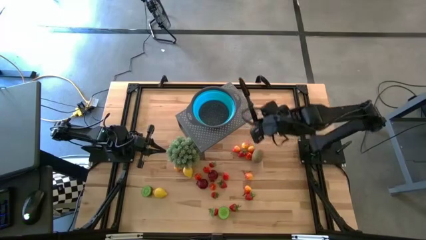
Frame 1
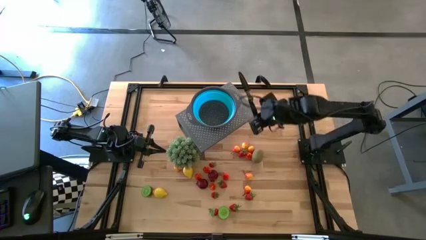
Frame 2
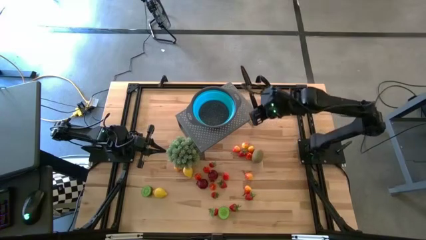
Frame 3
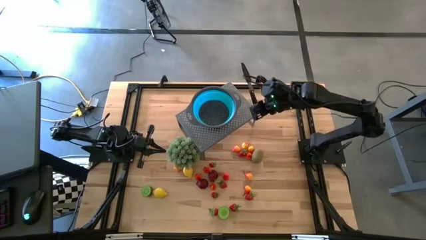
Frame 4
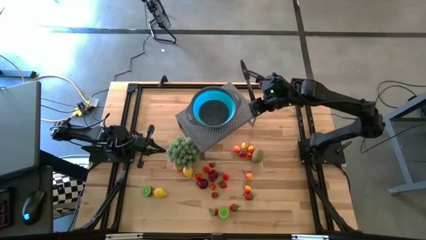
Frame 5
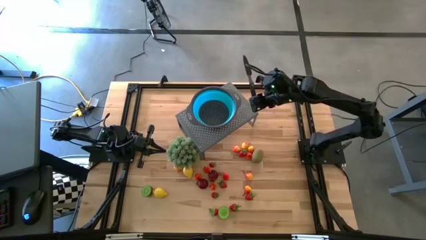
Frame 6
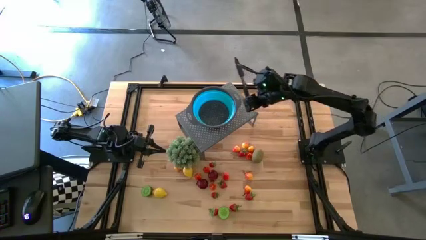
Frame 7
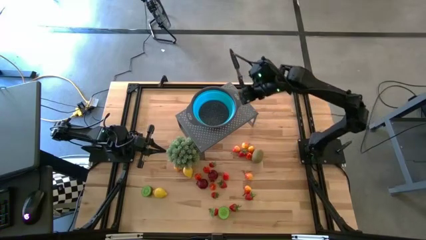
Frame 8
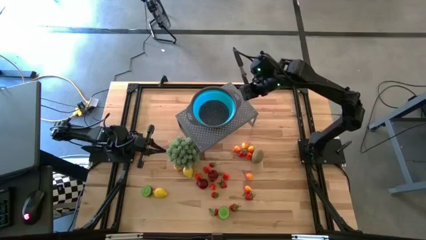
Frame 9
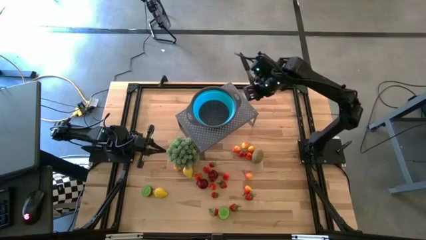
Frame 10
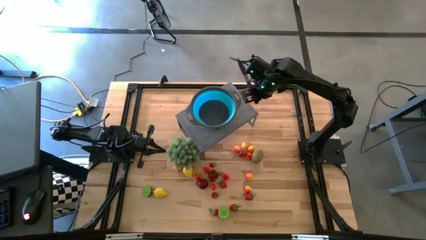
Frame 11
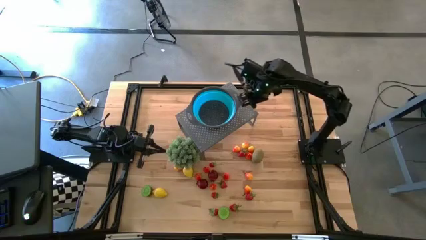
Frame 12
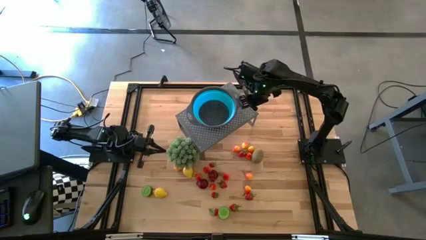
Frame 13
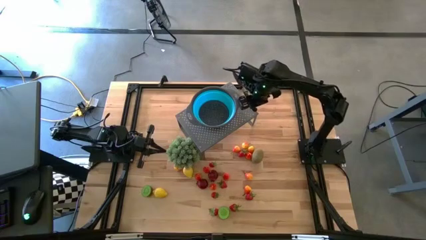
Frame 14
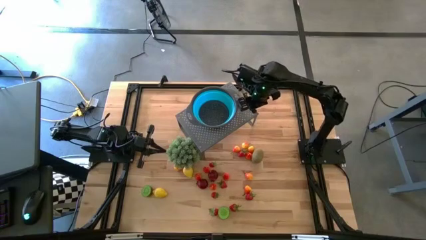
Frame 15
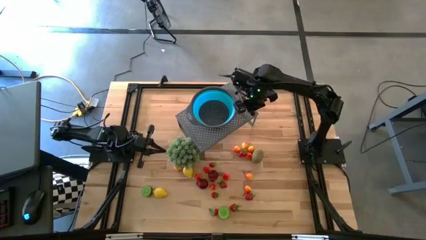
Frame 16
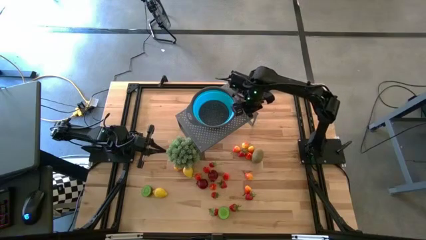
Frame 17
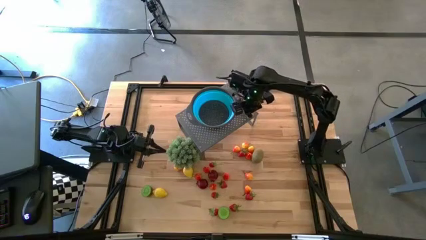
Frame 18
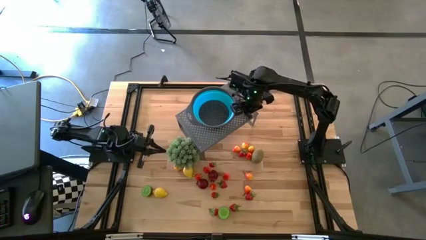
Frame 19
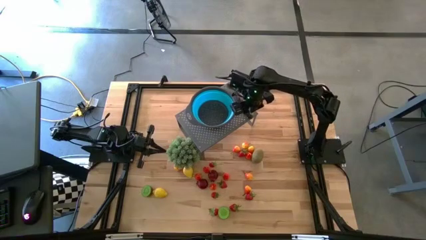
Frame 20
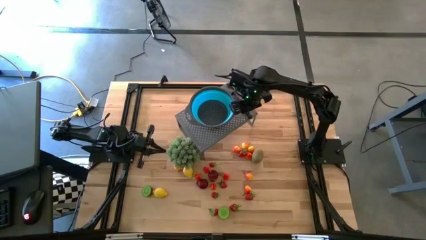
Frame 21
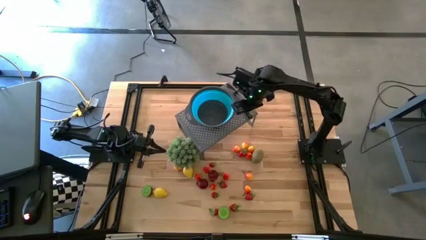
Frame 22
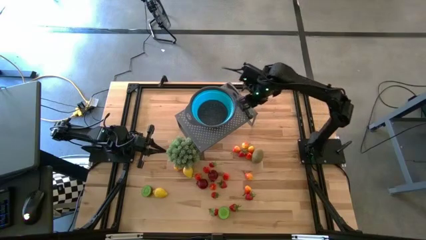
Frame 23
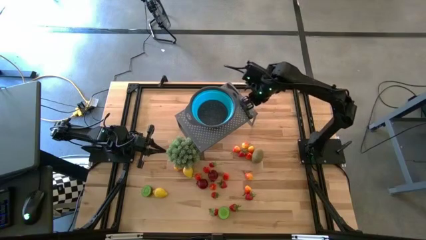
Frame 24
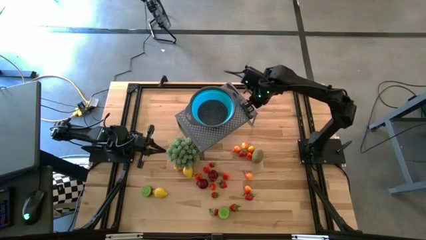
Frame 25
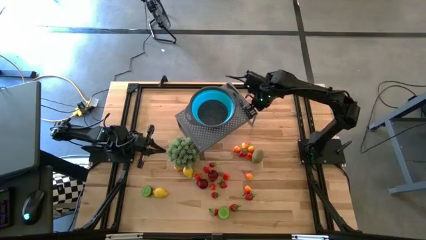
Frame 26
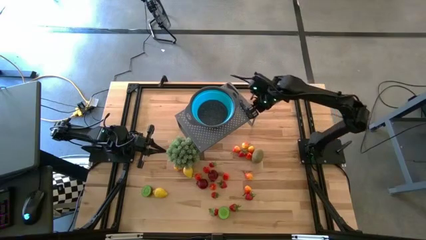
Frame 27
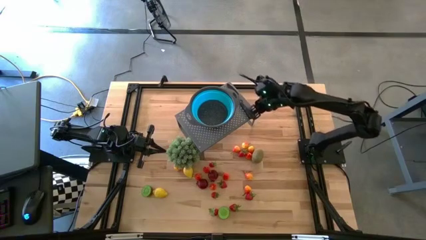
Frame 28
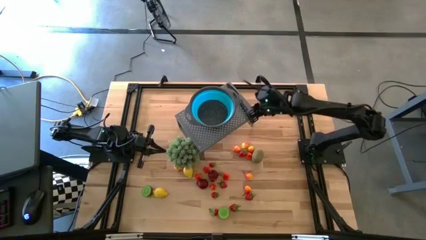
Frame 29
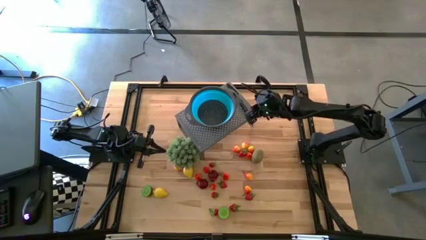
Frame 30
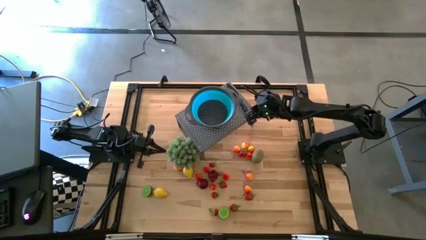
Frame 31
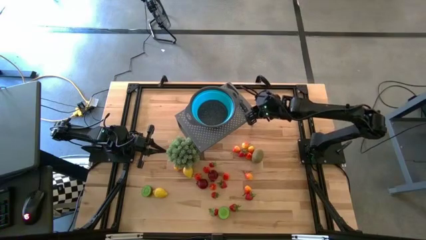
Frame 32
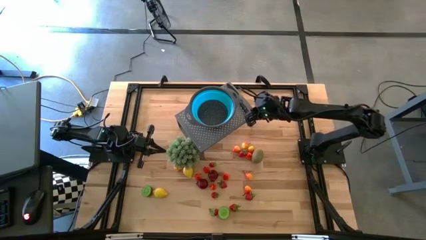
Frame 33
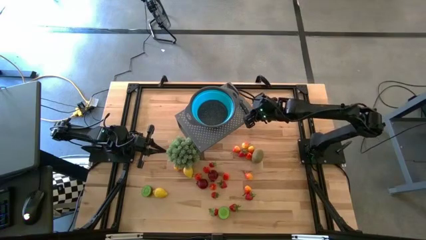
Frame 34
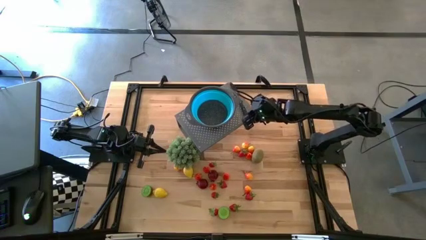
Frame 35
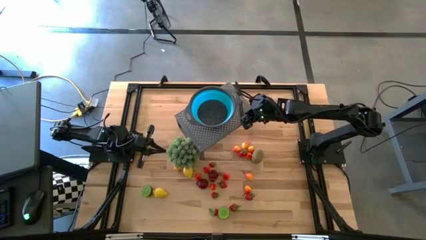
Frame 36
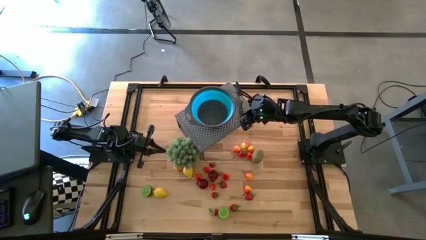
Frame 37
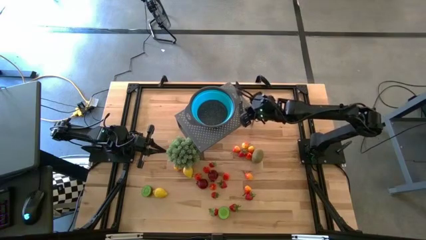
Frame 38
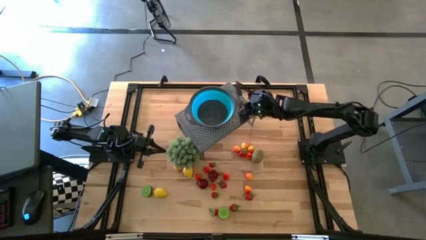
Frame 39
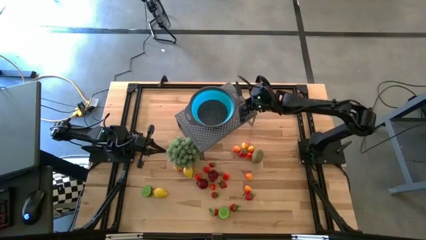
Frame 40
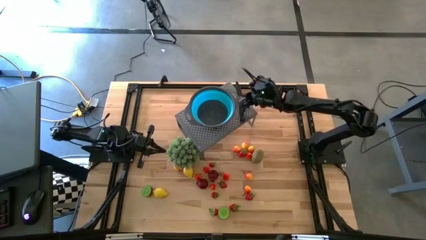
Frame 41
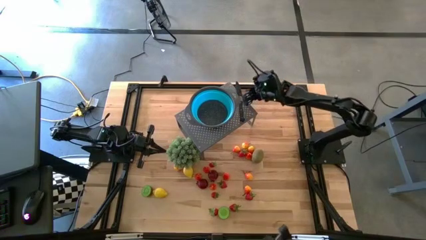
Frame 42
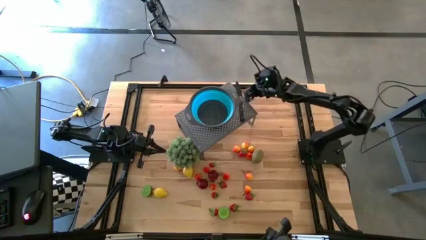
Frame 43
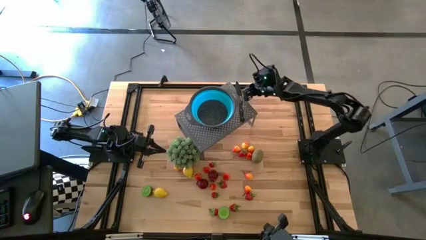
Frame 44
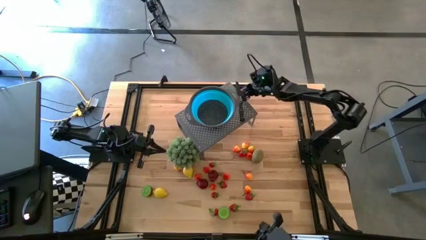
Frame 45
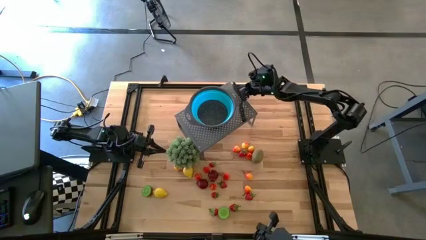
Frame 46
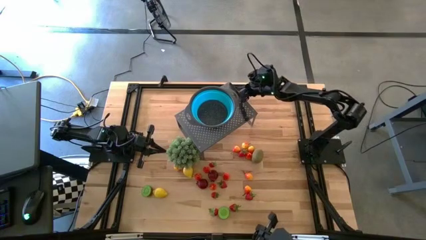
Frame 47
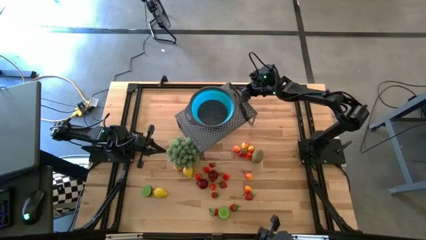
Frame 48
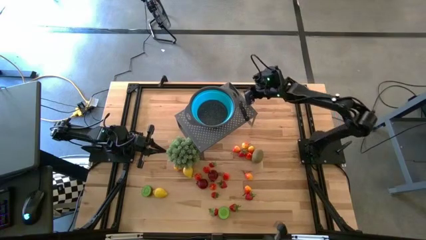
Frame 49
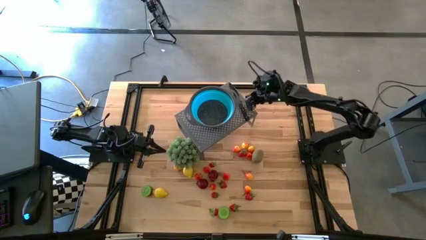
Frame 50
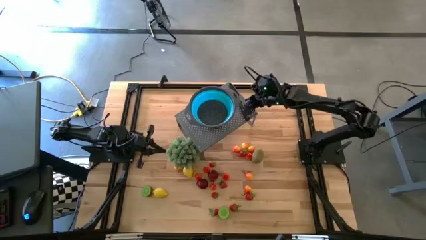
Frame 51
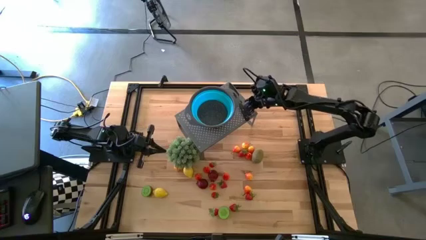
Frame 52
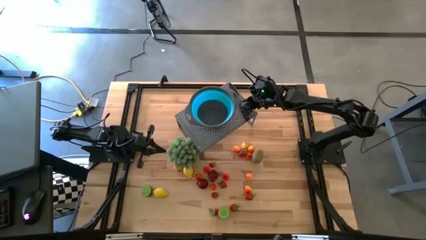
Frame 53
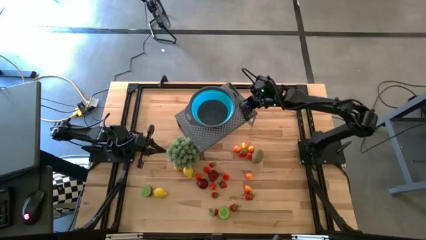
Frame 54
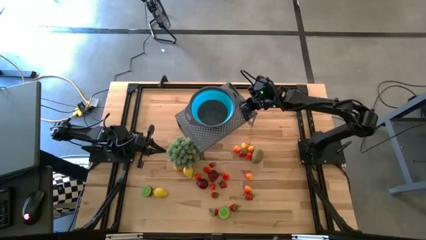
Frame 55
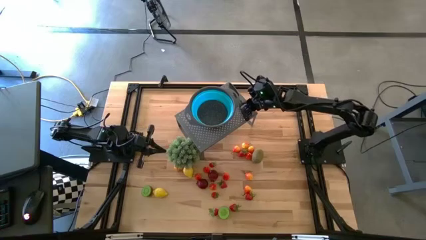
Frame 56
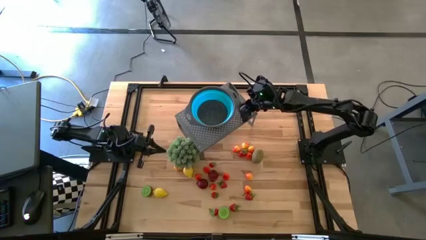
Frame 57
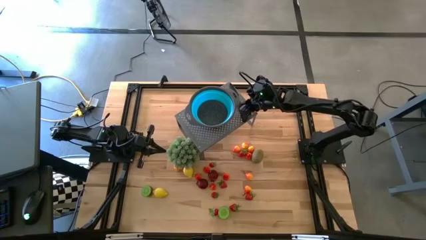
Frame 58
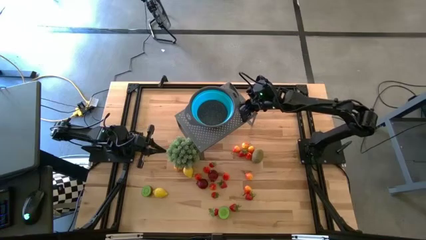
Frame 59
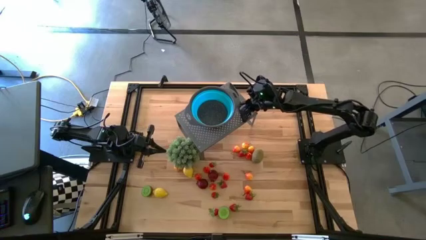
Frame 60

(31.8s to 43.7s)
Task: Pick & Place Fruit
Put the black kitchen knife on the shelf to the right of the blue strainer bowl
